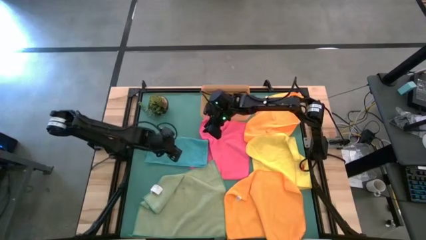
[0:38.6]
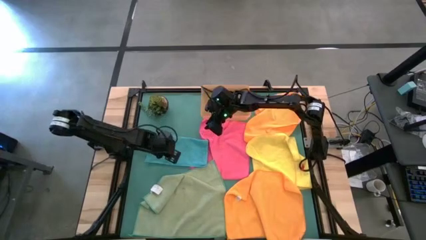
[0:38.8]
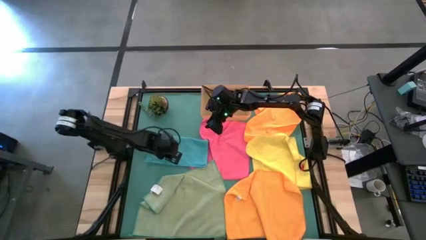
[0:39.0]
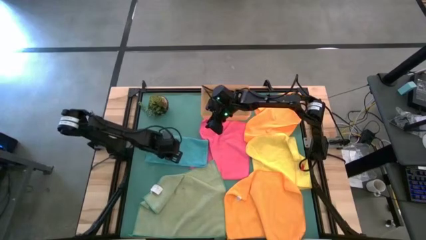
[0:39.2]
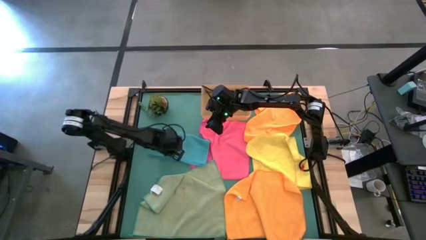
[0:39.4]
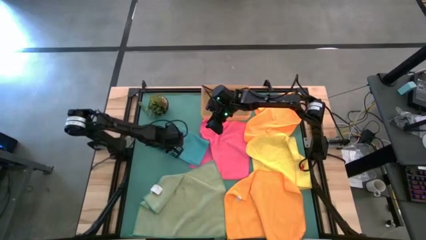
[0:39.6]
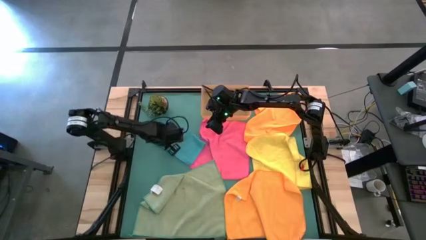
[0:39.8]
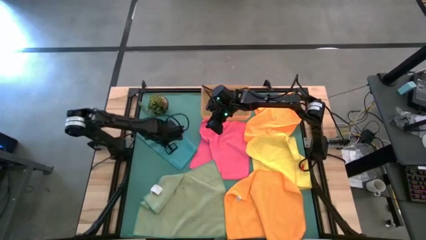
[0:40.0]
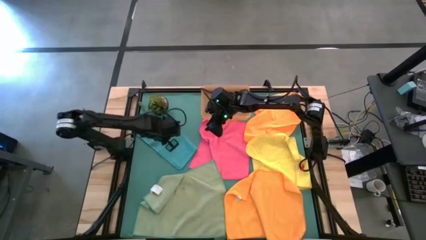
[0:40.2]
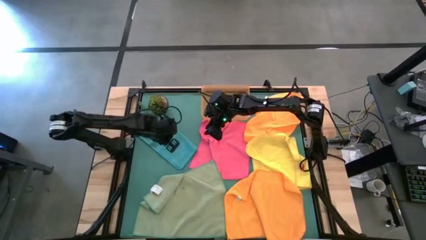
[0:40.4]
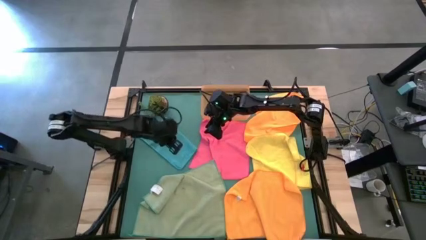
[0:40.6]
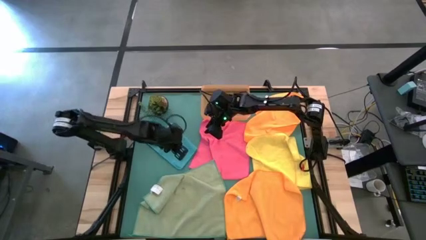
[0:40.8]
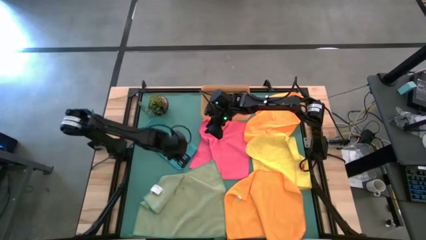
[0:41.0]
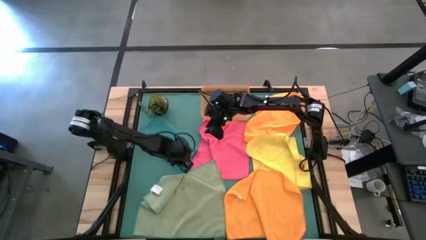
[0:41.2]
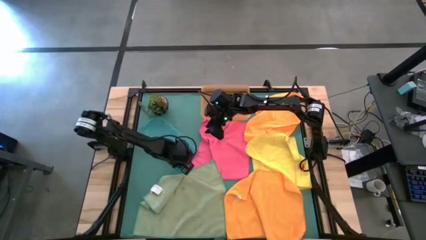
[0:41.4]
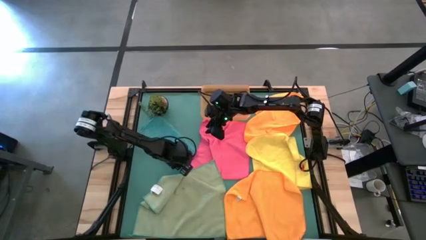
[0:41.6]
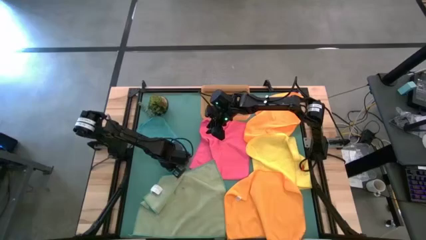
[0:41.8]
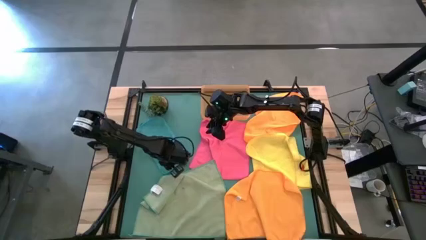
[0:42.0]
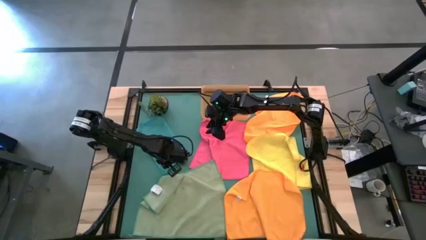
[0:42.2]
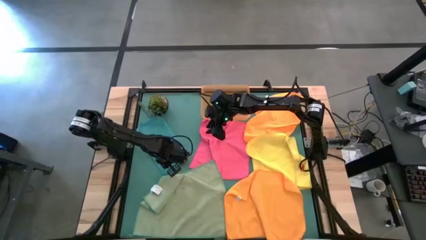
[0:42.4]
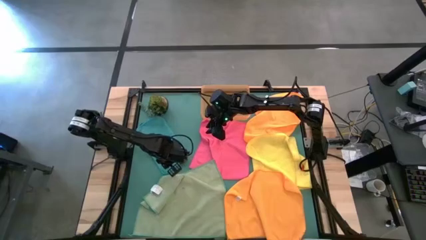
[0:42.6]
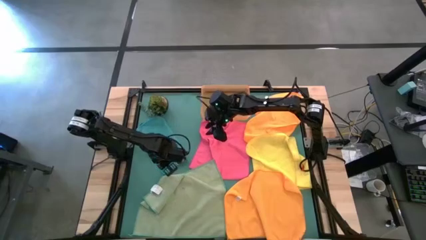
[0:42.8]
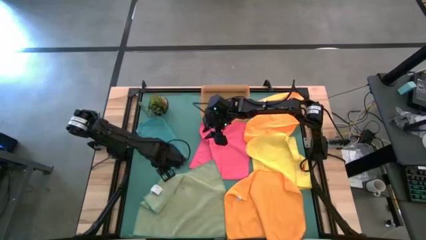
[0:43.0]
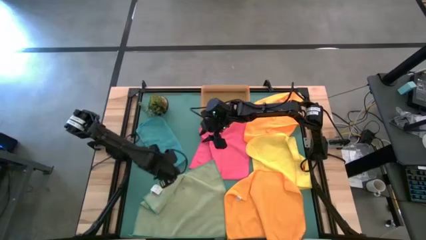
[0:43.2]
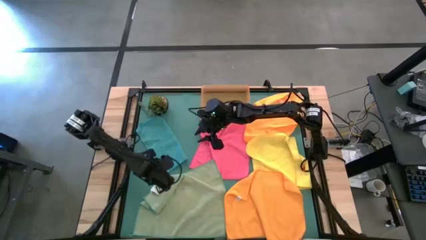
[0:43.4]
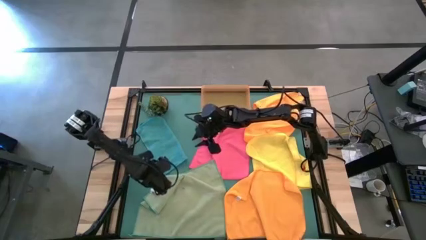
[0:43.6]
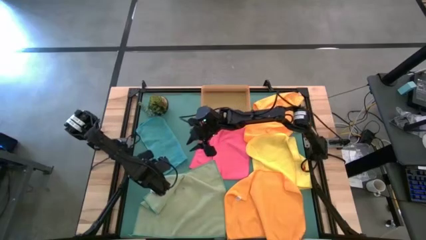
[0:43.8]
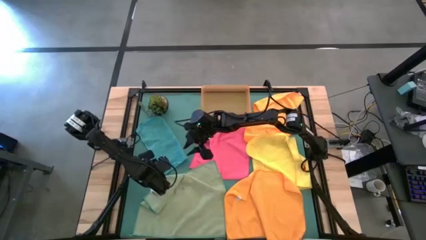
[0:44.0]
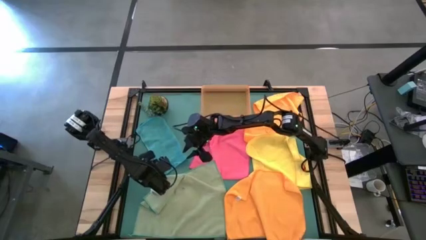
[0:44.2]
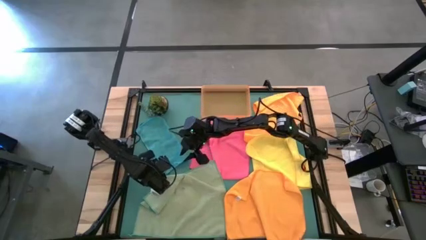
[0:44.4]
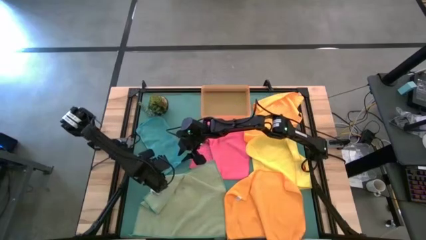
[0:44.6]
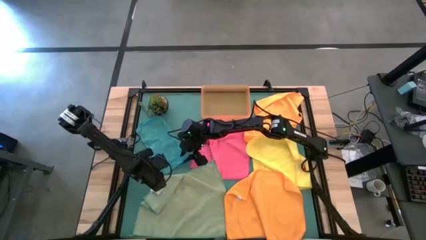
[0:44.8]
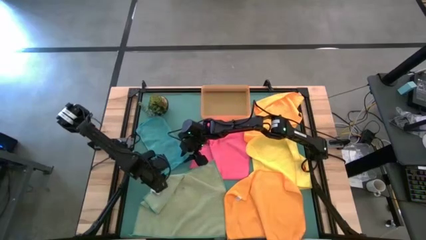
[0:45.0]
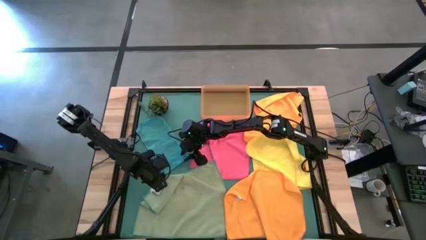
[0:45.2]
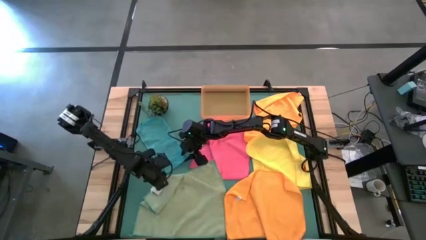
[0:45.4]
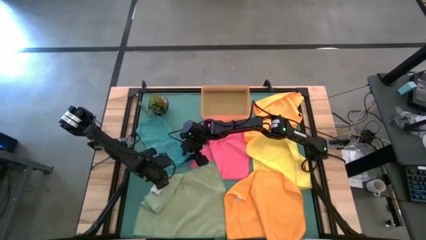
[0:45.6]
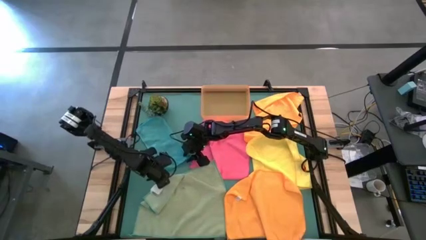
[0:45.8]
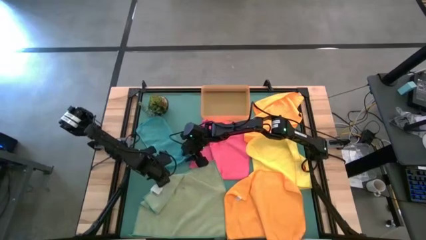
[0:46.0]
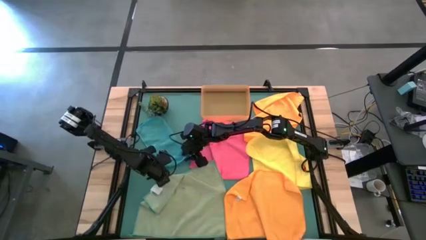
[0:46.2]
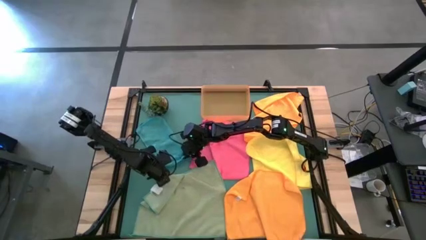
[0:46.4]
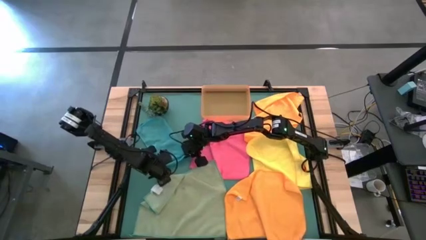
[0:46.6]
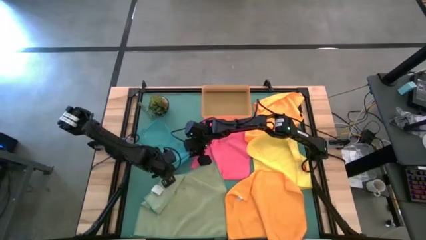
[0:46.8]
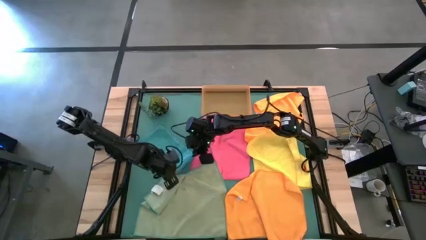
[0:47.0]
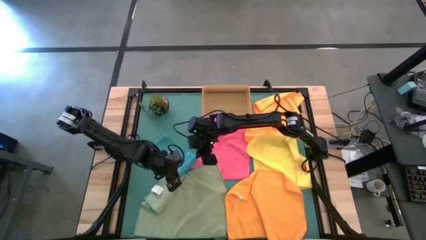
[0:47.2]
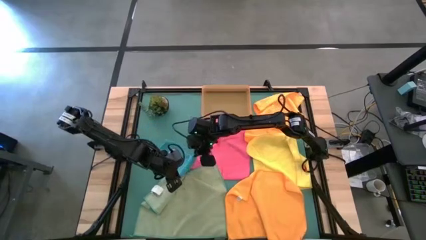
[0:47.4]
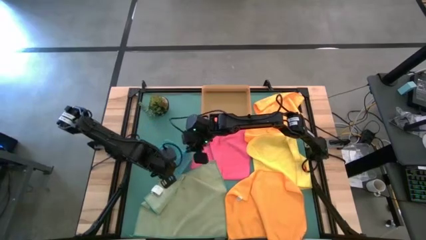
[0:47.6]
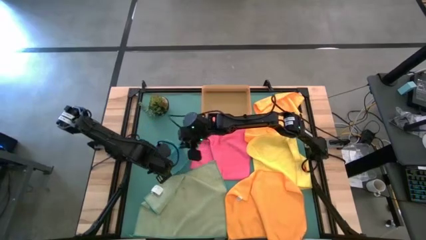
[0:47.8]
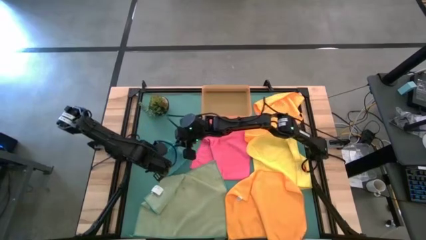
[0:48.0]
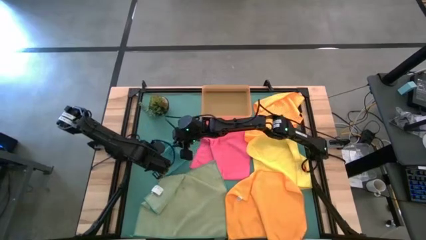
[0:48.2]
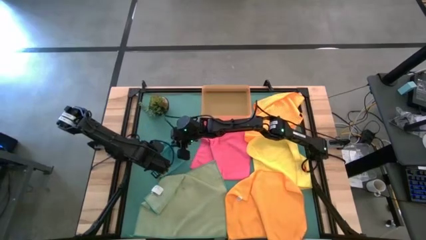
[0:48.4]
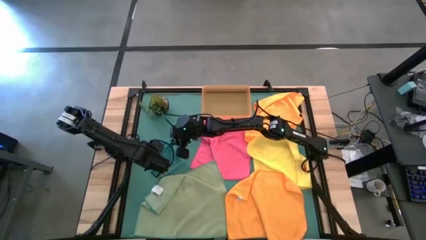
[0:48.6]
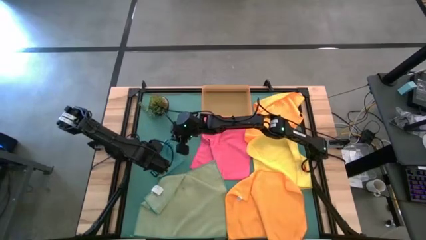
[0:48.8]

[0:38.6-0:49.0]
Task: Fold microfiber towels
Fold the blue microfiber towel
